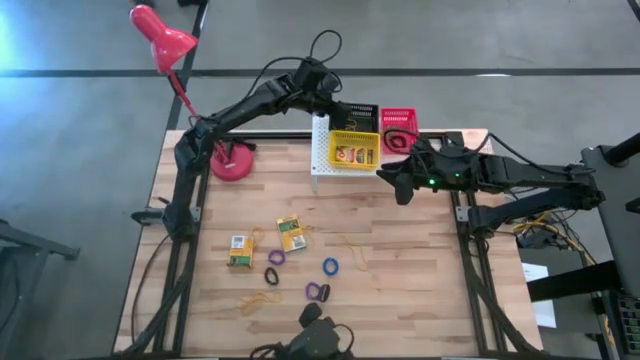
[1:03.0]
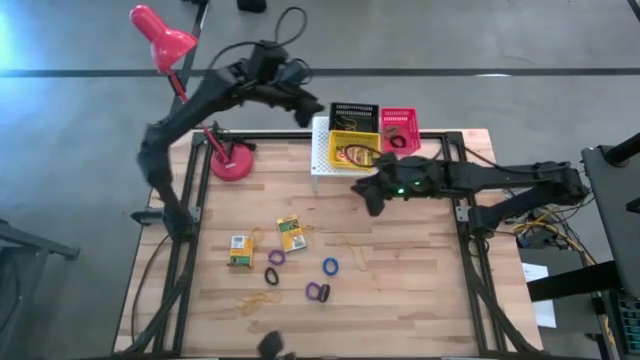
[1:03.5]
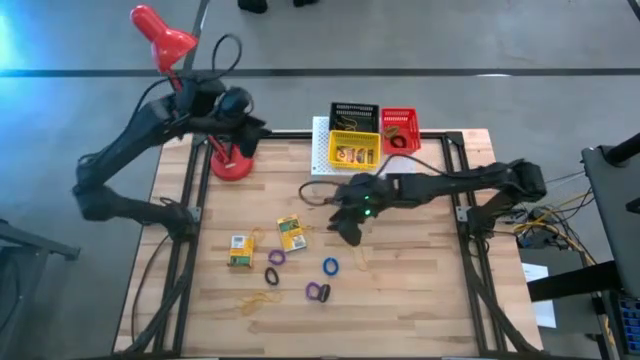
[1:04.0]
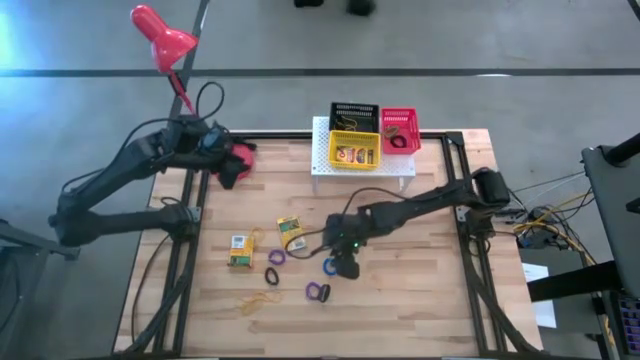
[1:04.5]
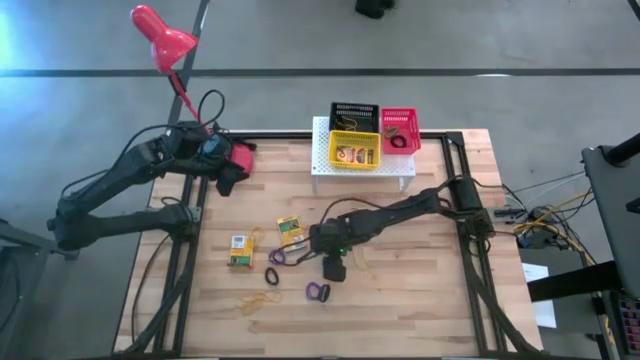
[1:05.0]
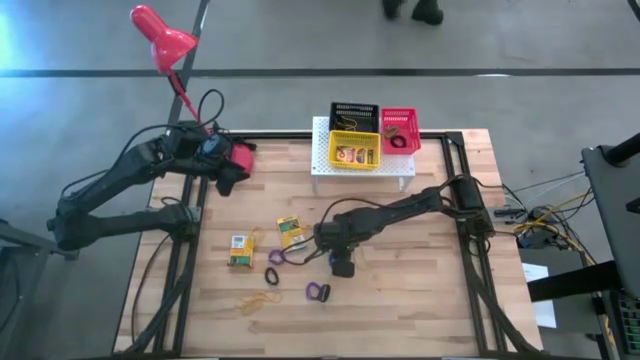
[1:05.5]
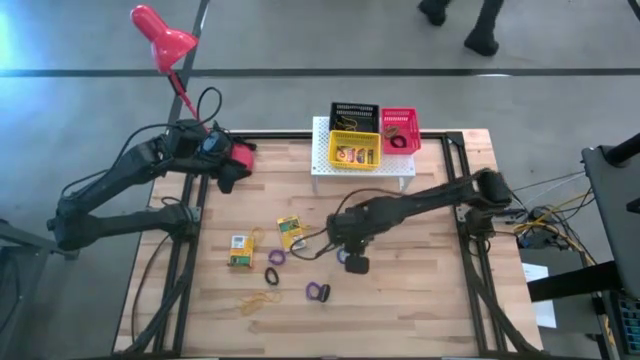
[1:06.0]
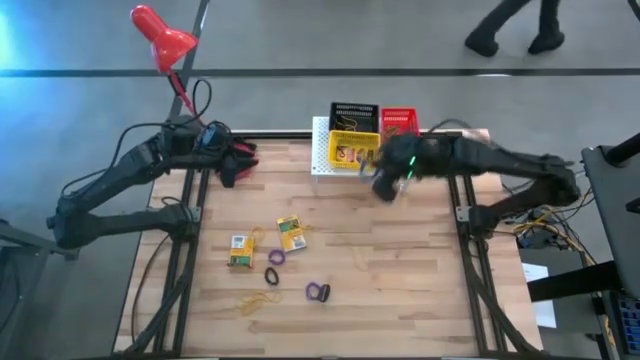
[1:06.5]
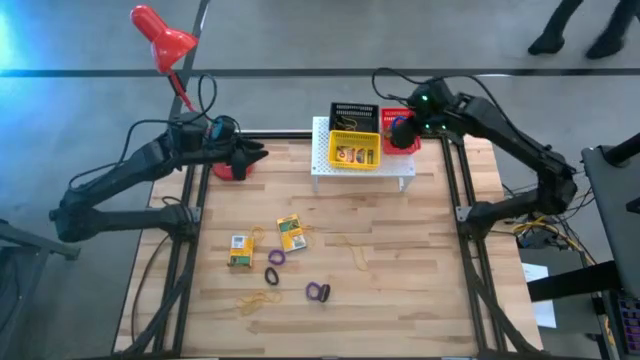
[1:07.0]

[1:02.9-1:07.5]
Task: Pick & Place Office Desk Supplies
Put the blue spring keychain in the red bin on the shelf

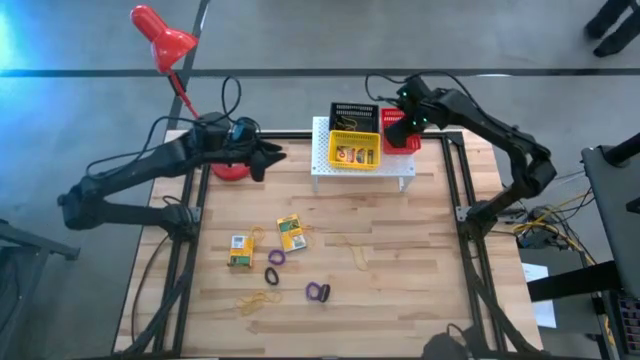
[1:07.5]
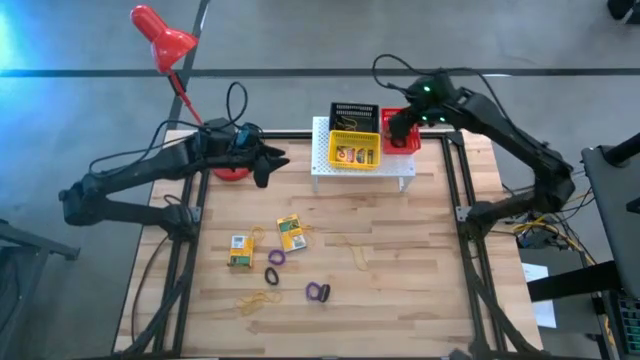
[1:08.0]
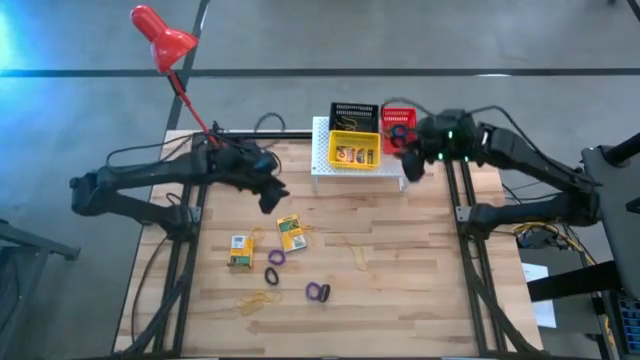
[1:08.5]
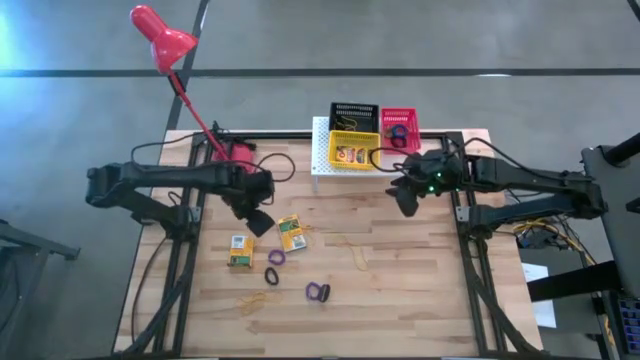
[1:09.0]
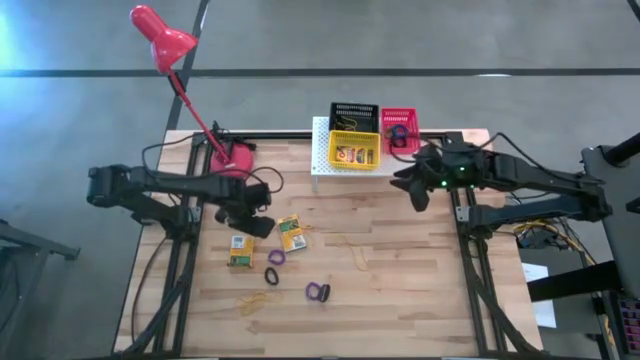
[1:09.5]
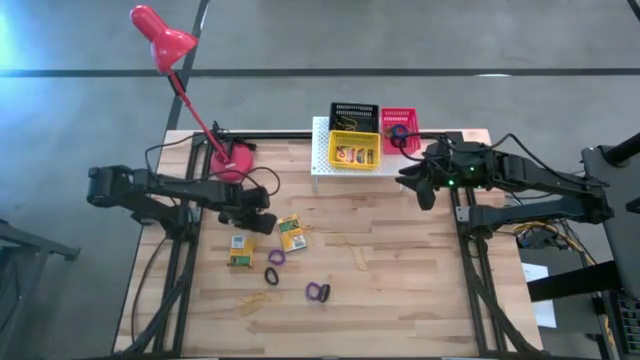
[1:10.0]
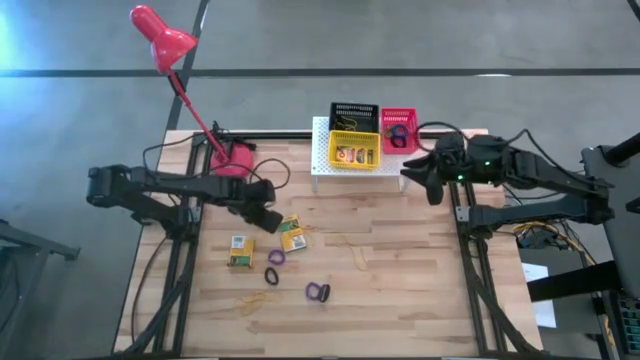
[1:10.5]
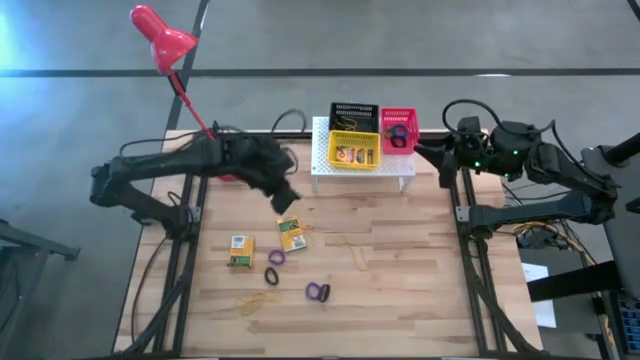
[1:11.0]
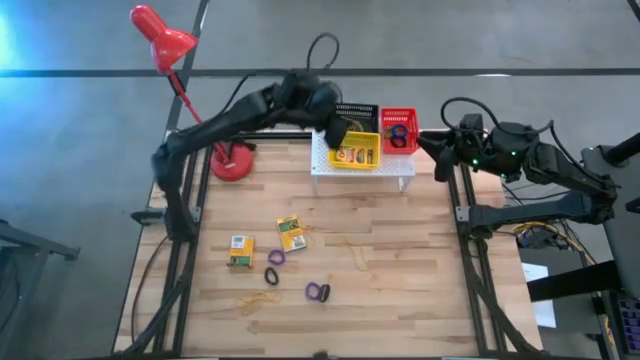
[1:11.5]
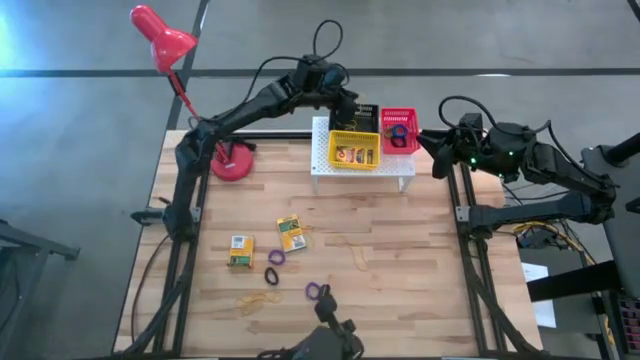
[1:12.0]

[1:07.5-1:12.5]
Put the yellow rubber band in the black bin on the shelf

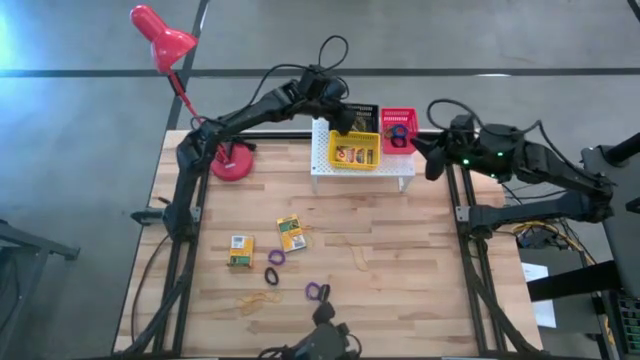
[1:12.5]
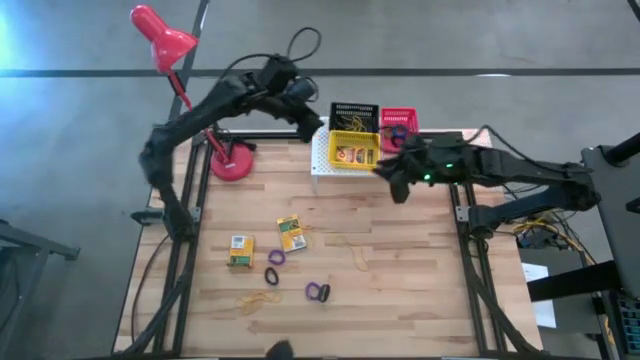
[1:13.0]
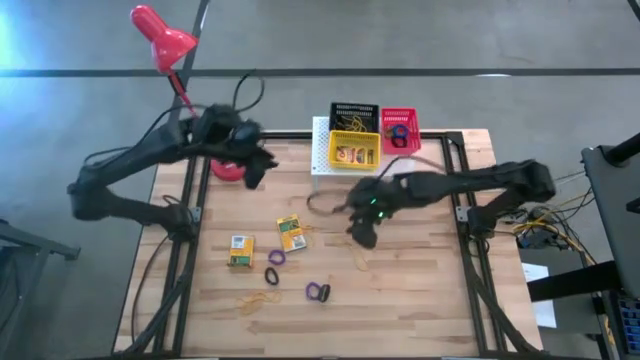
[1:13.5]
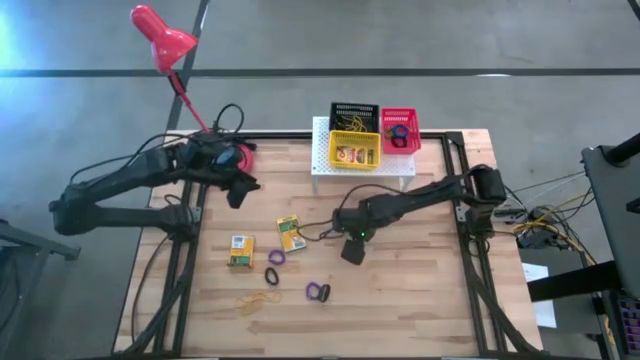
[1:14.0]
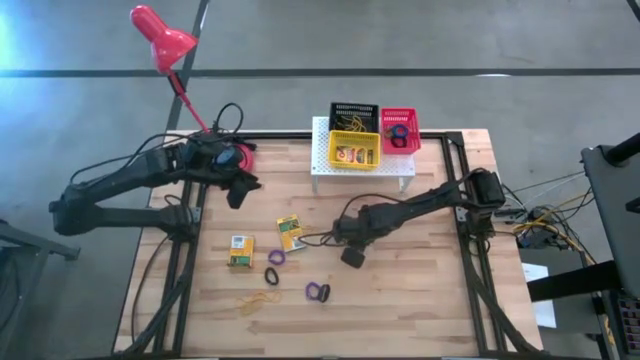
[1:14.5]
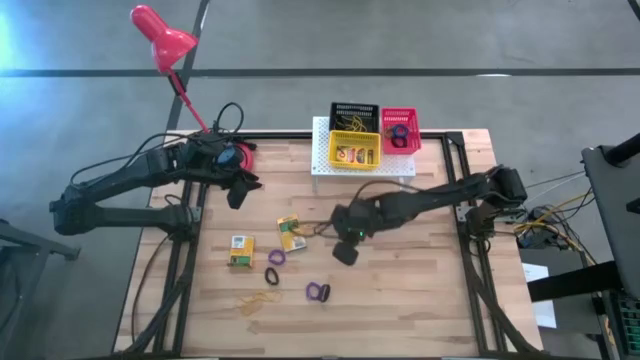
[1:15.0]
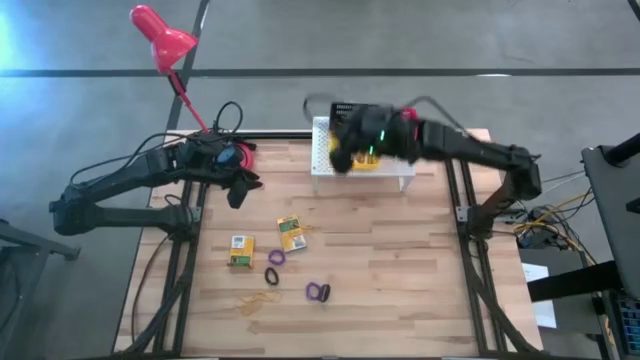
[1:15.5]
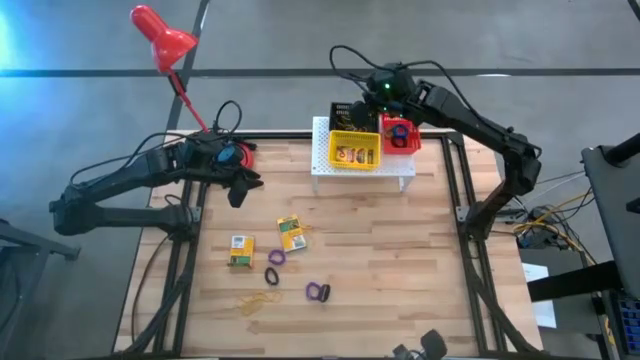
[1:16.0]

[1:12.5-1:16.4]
Put the yellow rubber band in the black bin on the shelf

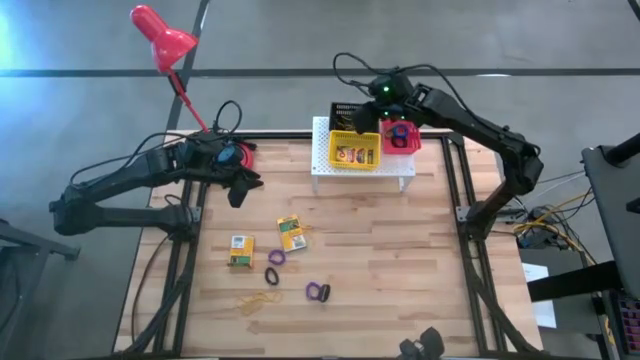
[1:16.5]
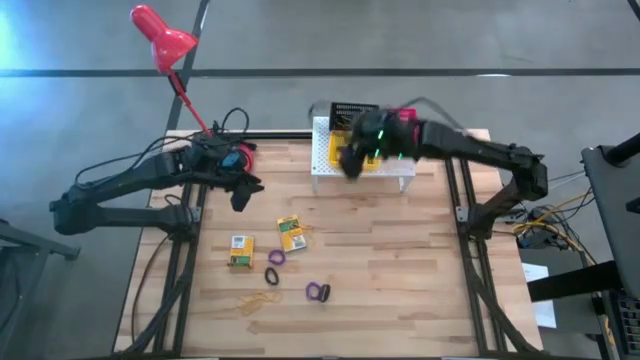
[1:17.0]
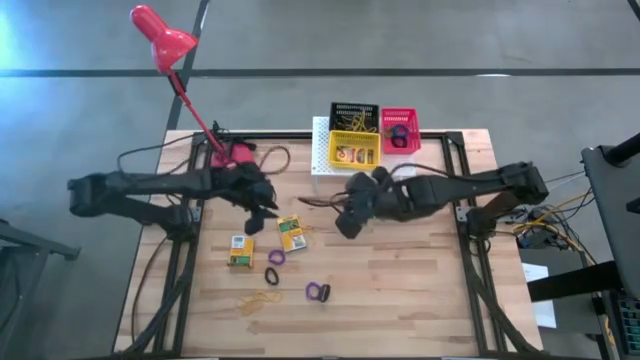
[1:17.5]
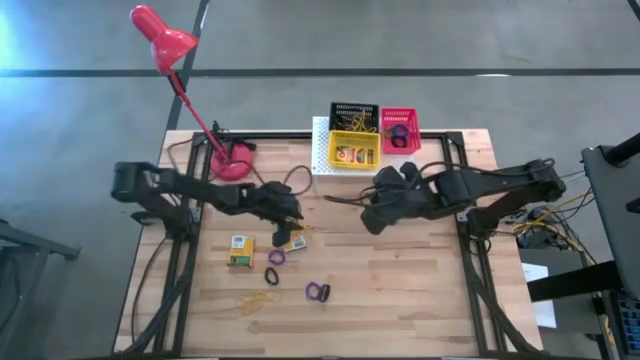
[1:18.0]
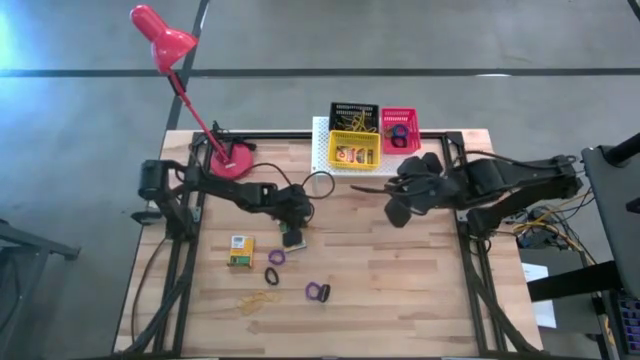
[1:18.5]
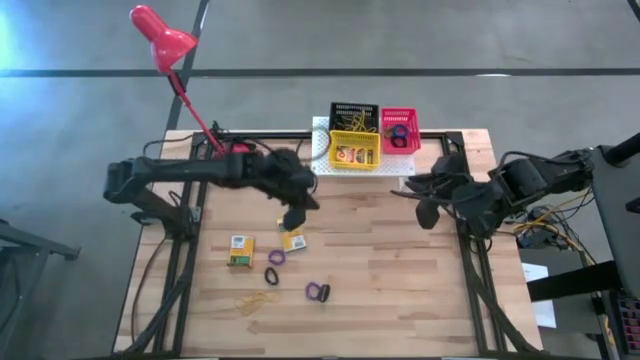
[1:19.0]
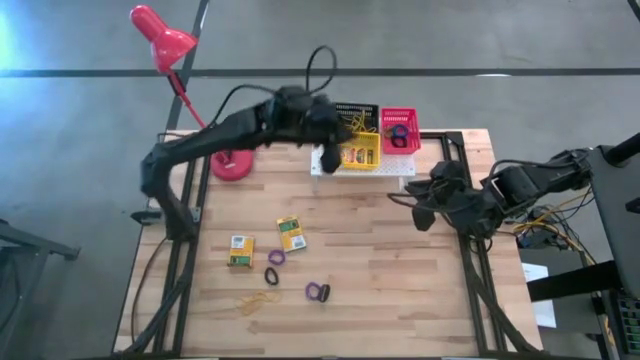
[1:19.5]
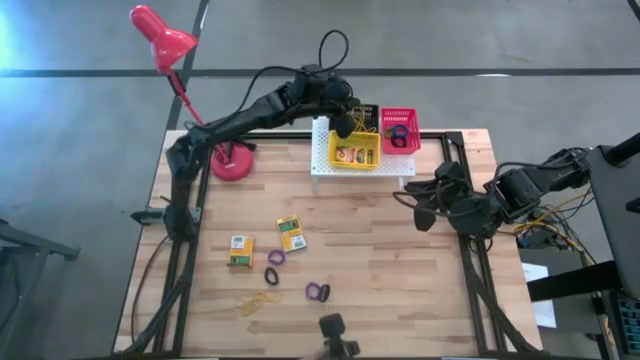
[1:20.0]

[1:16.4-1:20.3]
Put the yellow rubber band in the black bin on the shelf

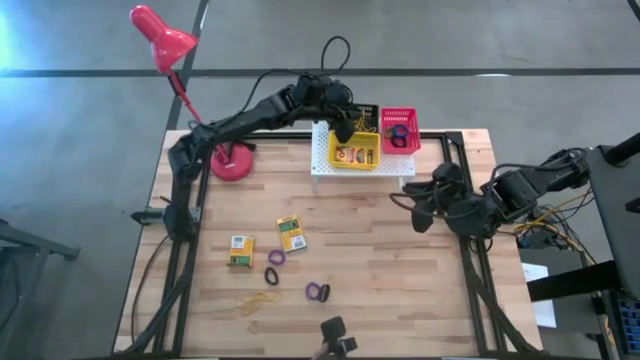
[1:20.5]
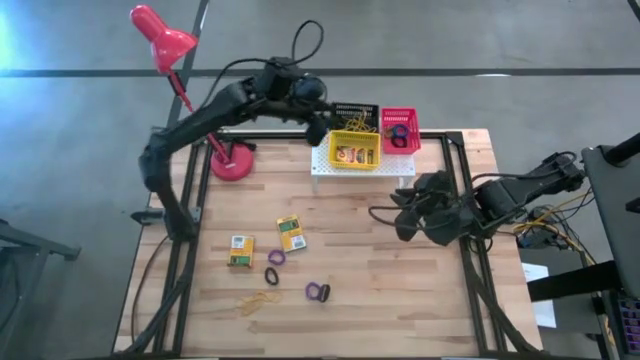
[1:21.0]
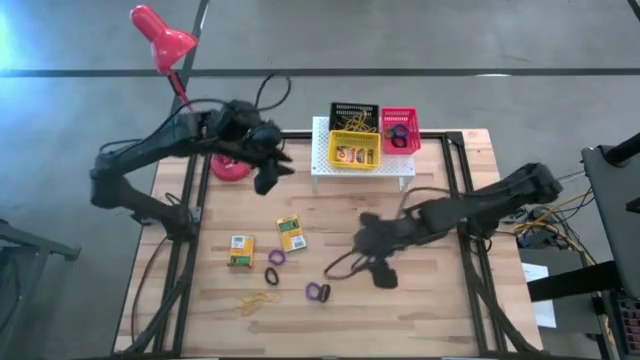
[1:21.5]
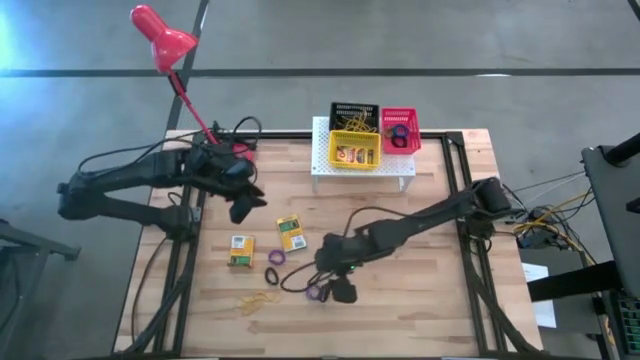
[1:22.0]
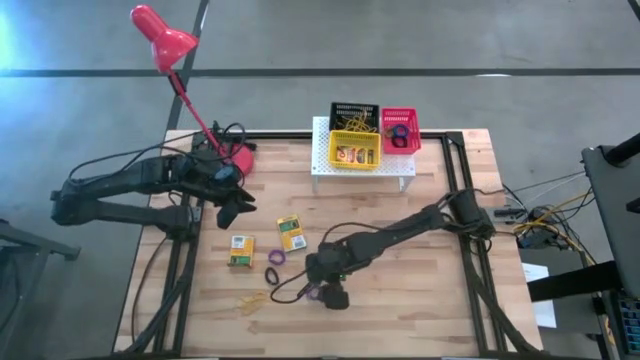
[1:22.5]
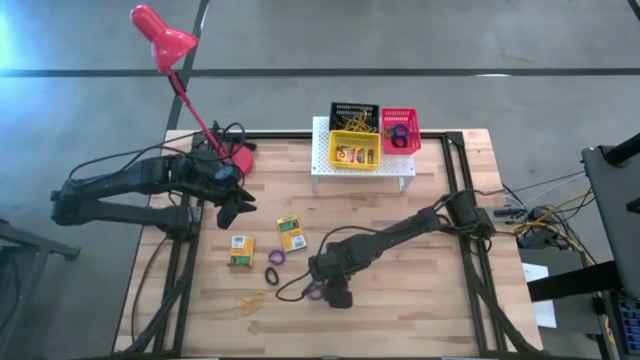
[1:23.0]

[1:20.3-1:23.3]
Put the black rubber band in the black bin on the shelf

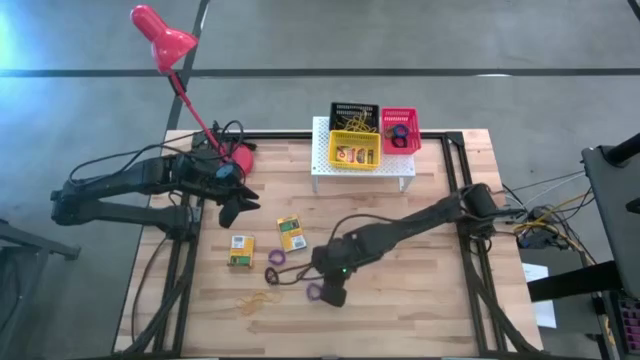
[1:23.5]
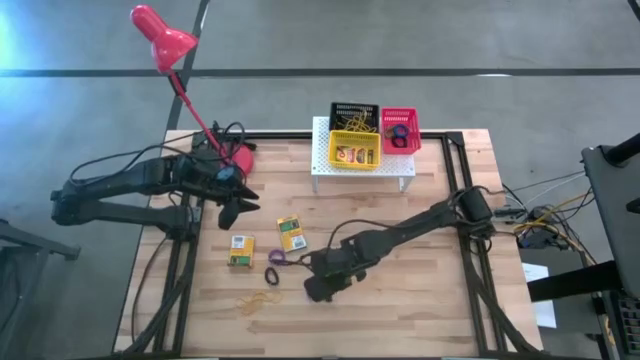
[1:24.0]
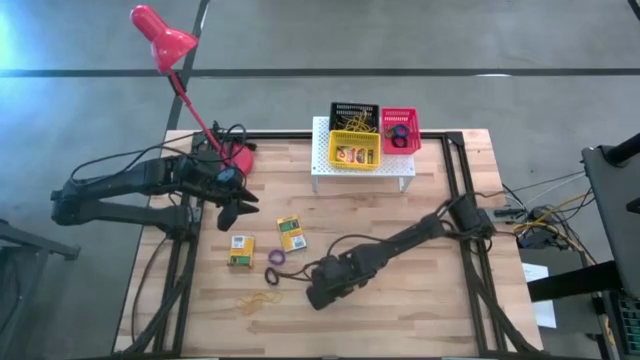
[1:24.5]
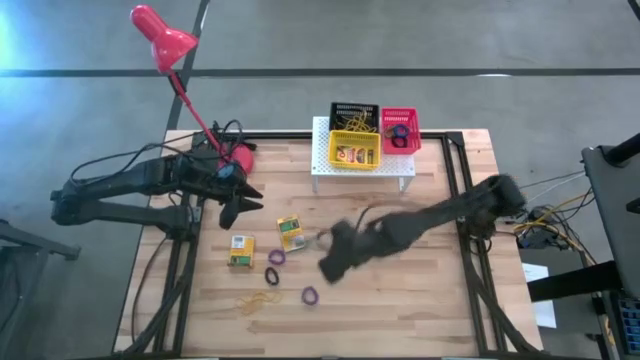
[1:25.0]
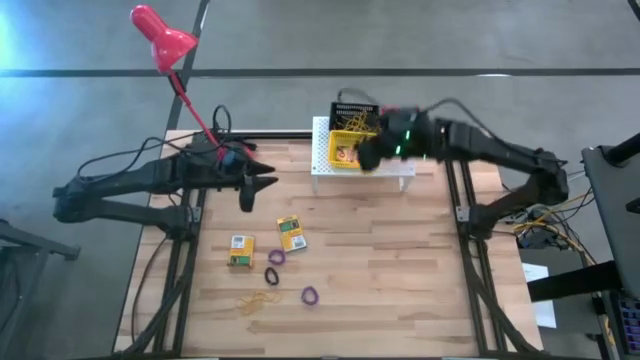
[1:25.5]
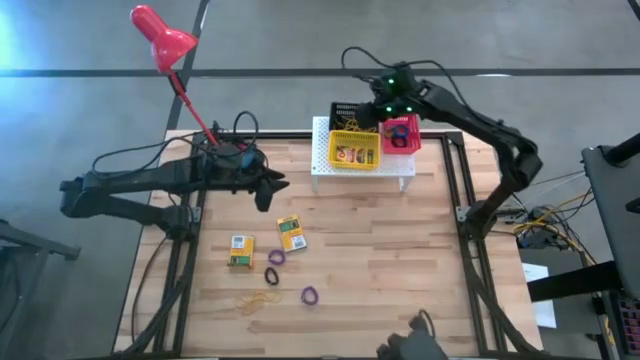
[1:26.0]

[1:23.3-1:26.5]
Put the black rubber band in the black bin on the shelf
